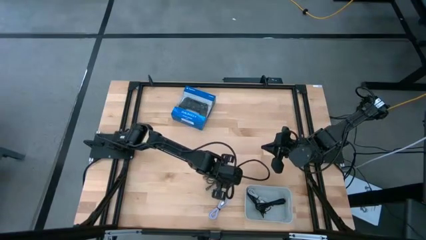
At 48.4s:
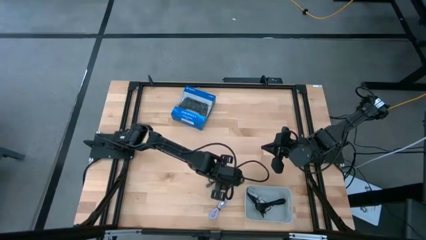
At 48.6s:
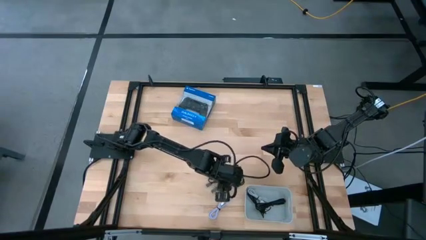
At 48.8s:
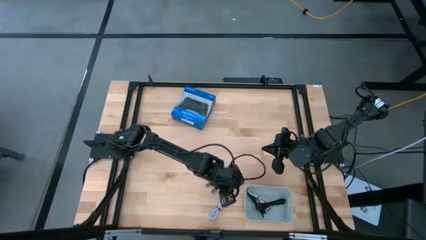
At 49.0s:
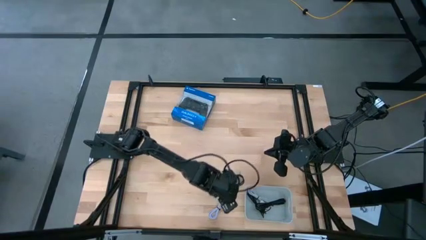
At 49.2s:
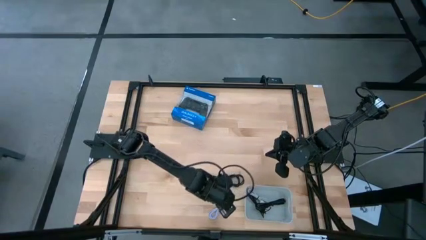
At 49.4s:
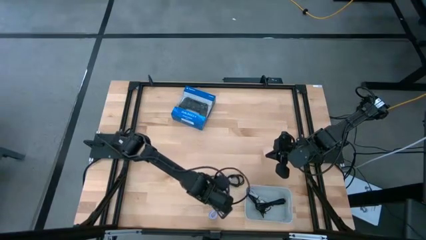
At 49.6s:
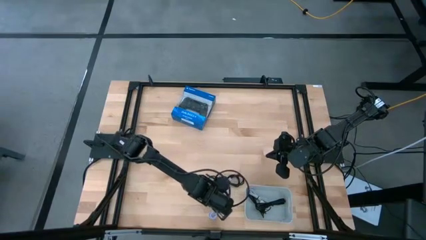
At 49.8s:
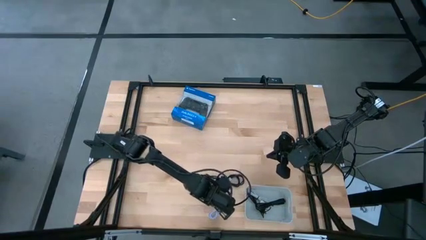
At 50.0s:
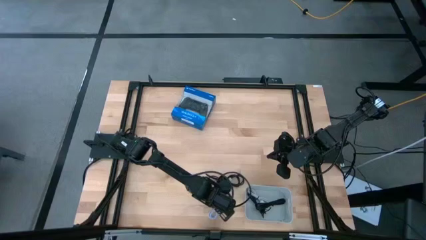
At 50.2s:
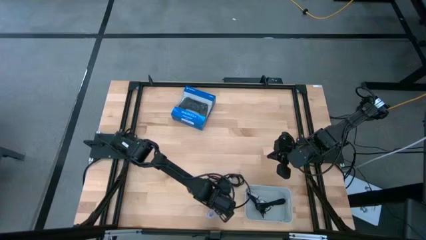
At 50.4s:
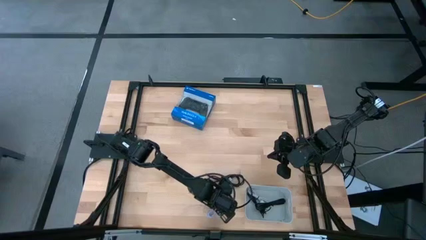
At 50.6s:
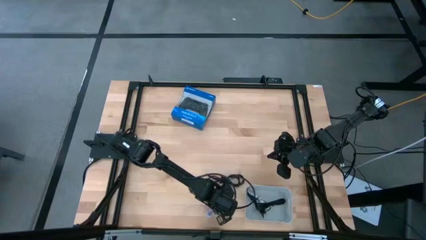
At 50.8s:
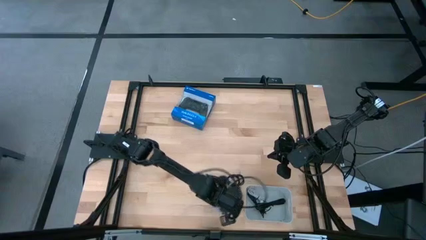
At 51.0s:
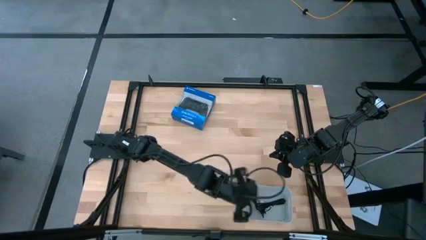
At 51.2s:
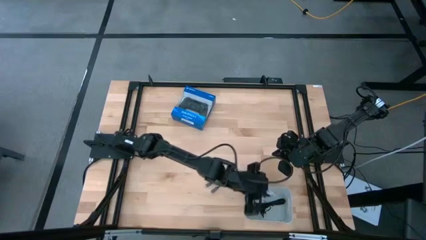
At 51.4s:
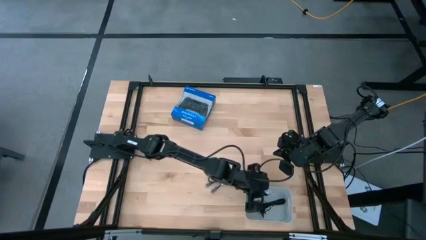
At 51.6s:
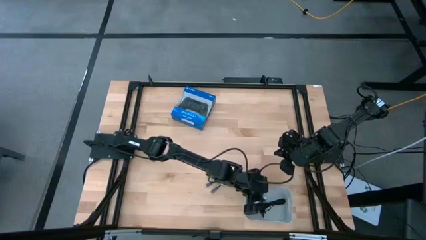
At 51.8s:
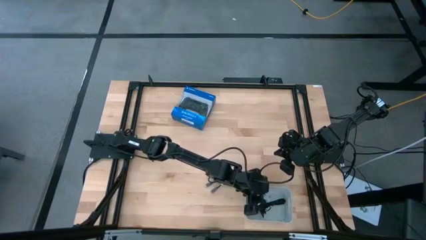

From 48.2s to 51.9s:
Task: Pick and place USB-C Cables
Put the white charger cable into the white bin

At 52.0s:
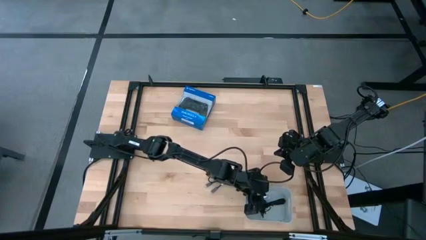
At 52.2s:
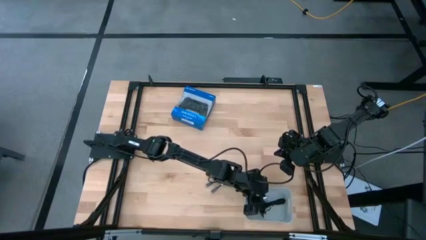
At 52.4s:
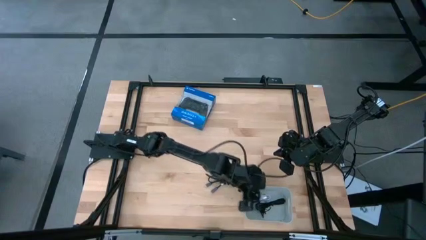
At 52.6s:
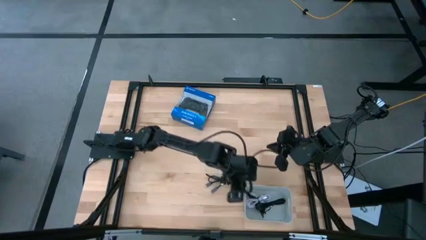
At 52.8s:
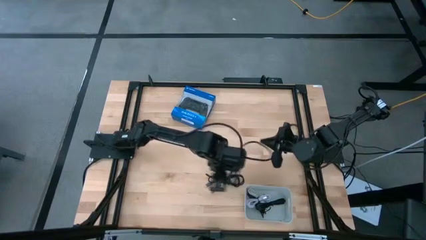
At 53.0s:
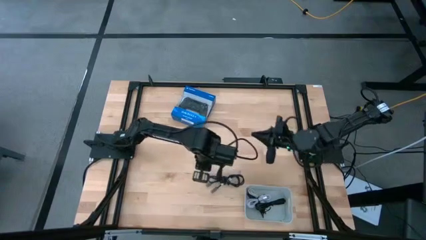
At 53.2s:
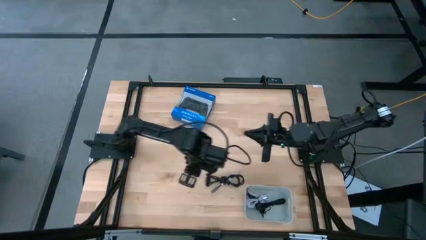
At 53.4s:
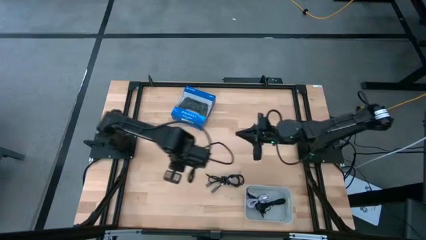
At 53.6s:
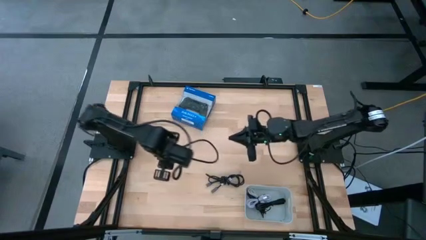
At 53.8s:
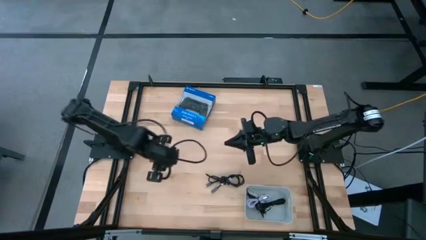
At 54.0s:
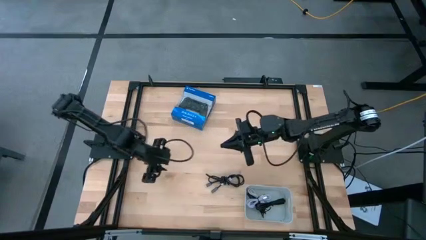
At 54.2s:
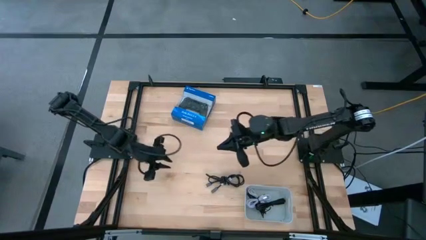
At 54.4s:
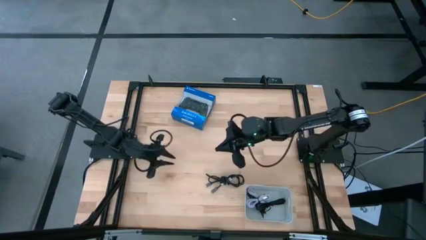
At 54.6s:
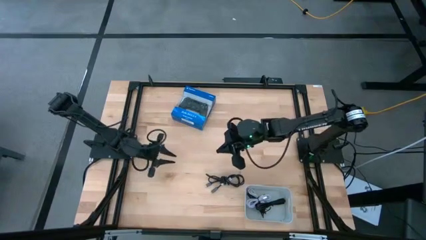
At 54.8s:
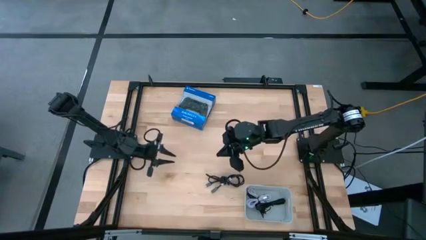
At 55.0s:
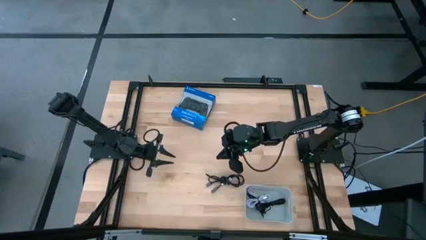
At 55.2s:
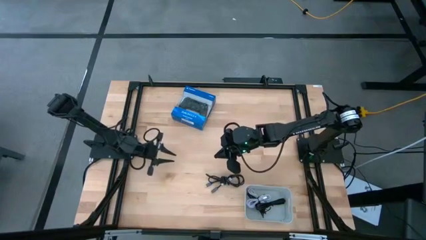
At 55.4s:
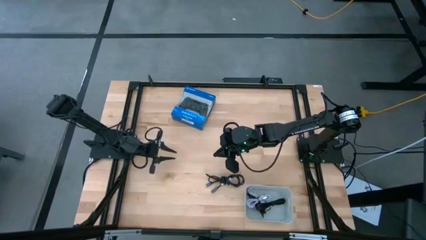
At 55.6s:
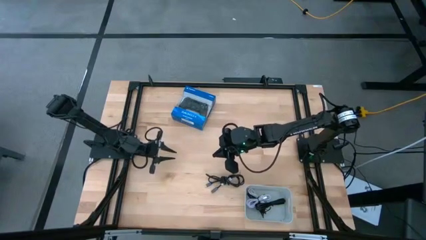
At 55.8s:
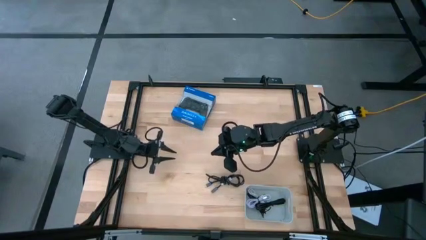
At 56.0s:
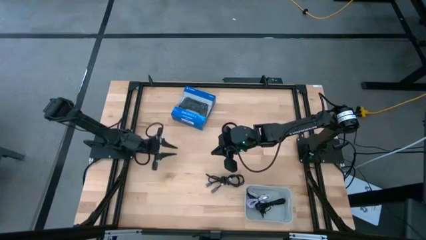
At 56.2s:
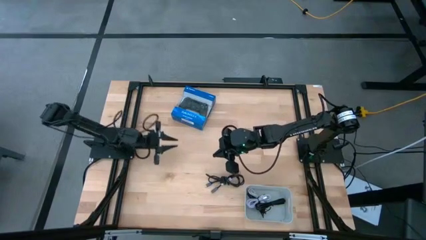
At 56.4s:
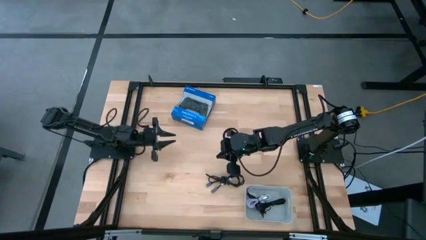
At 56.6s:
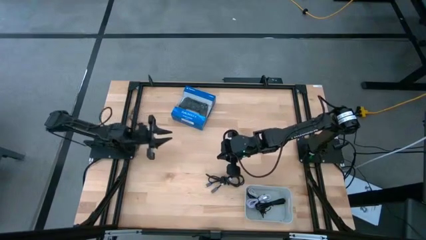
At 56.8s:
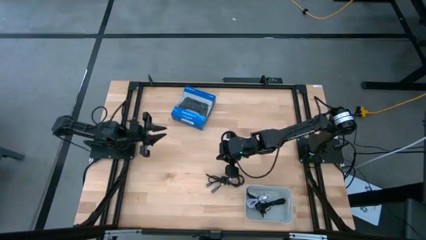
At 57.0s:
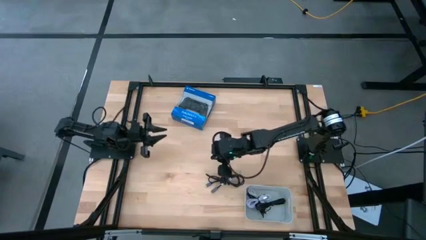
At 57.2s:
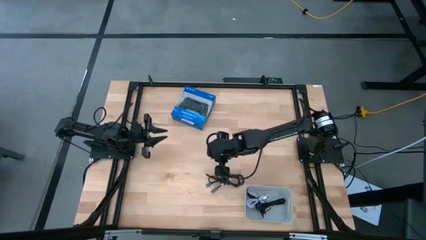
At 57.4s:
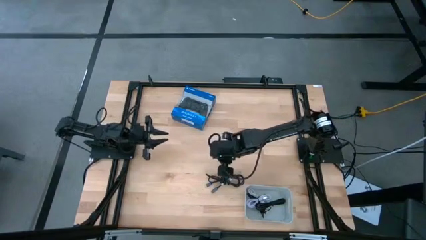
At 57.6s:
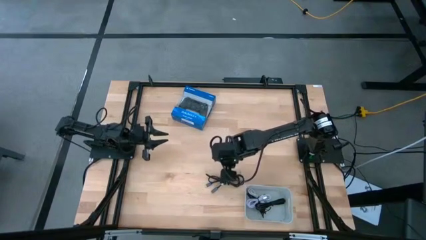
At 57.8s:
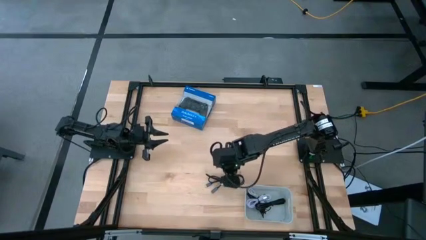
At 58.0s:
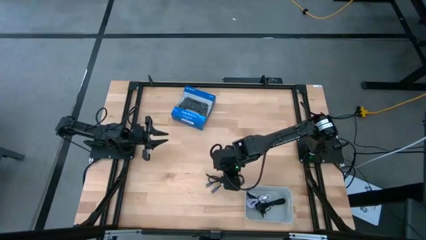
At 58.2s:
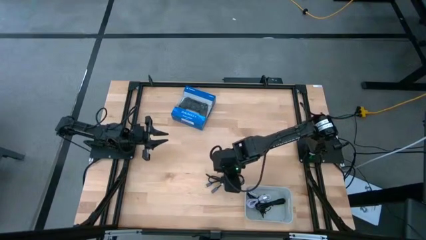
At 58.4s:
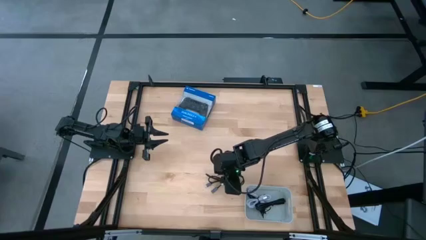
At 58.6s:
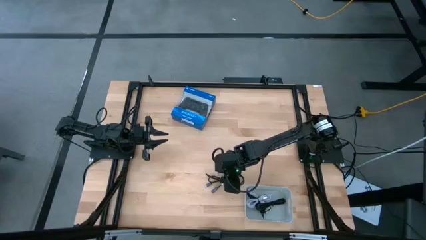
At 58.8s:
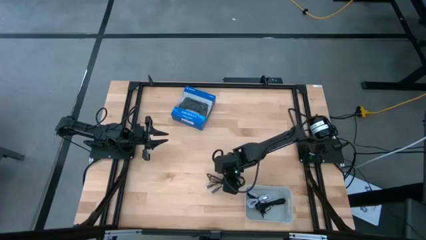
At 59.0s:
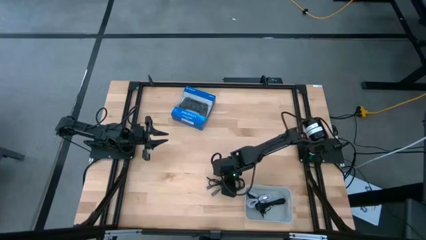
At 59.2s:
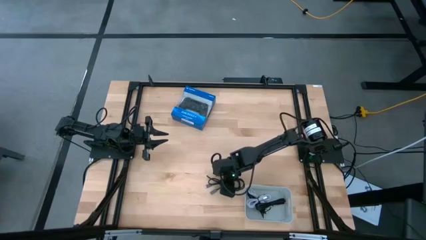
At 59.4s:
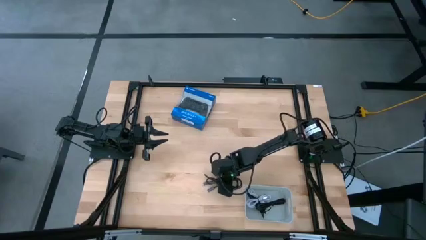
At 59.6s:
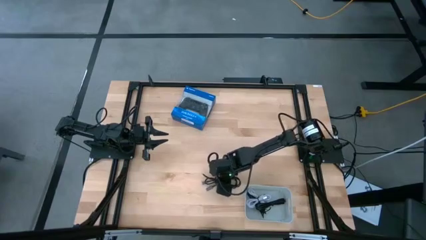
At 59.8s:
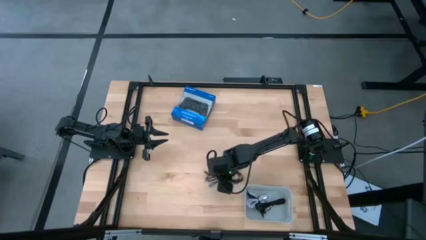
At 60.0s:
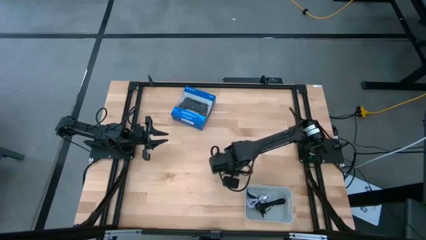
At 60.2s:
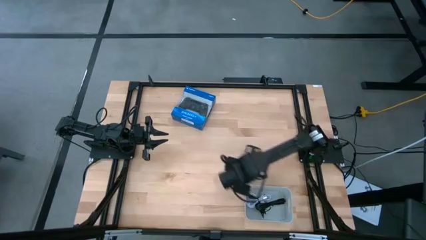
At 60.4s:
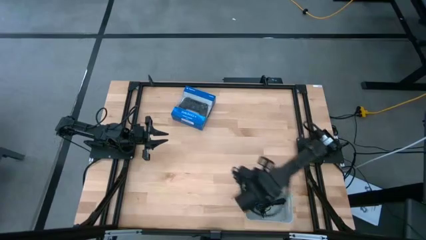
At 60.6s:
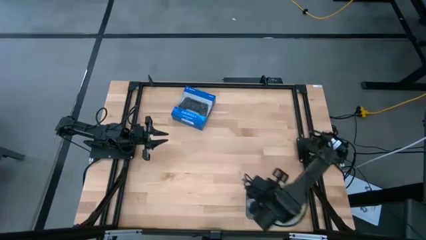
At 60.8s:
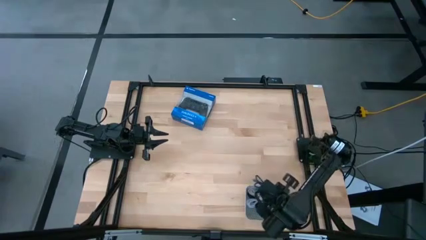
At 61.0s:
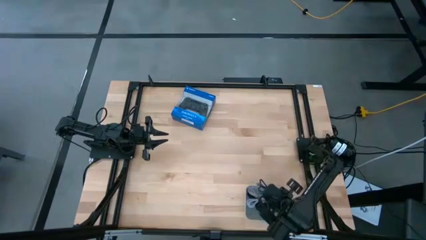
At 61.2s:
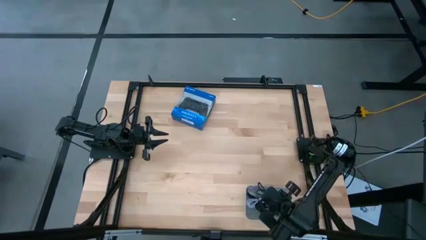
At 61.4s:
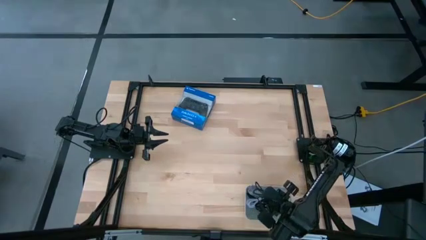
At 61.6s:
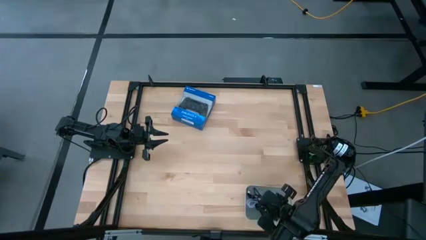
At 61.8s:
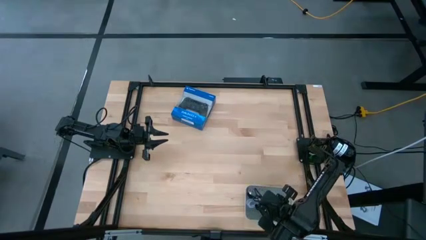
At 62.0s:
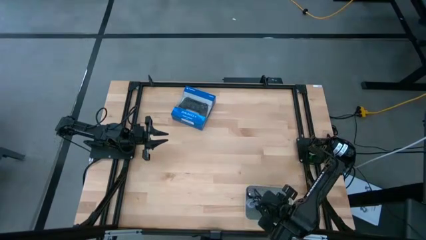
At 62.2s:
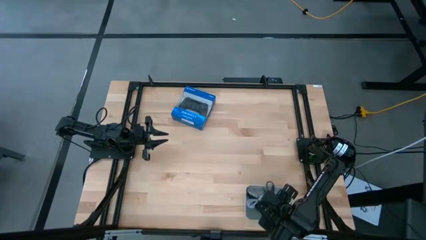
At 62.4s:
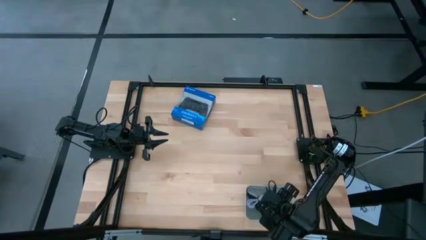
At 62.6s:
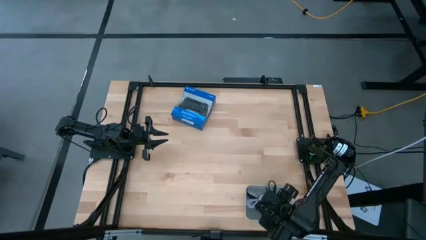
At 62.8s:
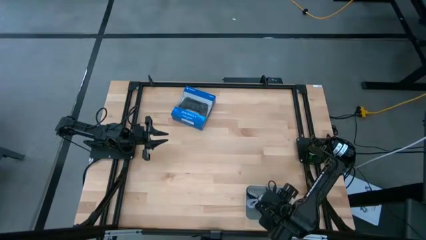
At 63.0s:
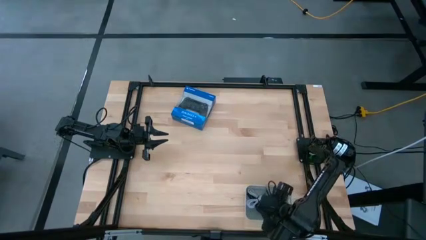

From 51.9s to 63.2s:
Put the black charger cable into the white bin

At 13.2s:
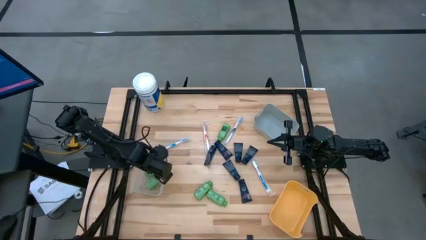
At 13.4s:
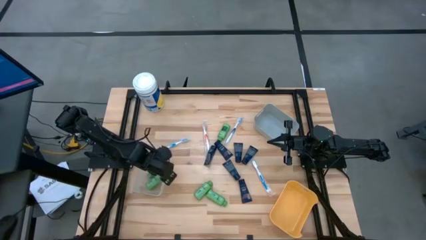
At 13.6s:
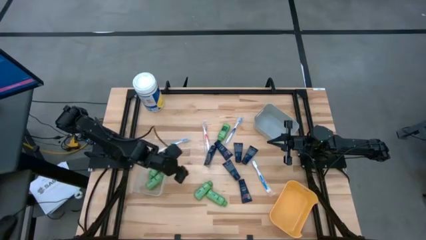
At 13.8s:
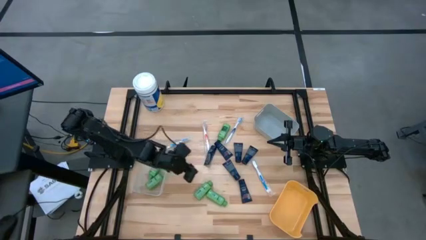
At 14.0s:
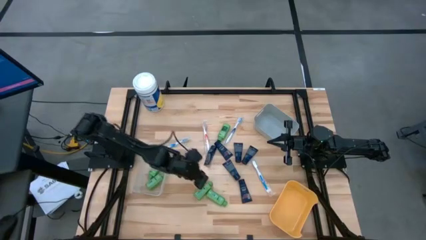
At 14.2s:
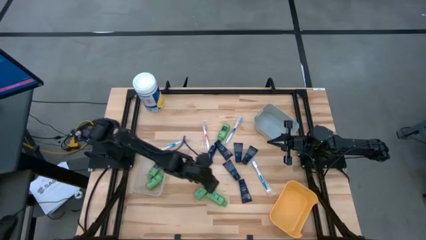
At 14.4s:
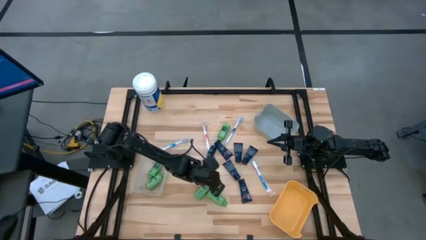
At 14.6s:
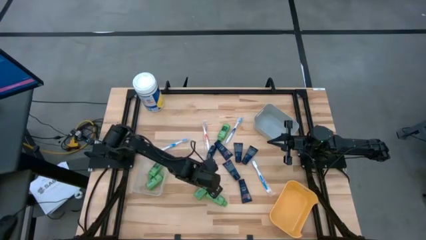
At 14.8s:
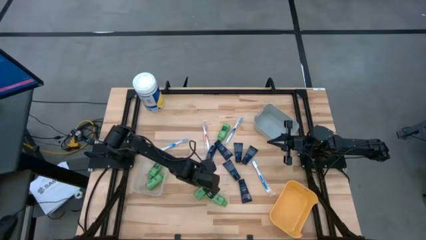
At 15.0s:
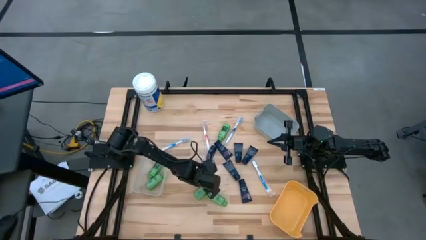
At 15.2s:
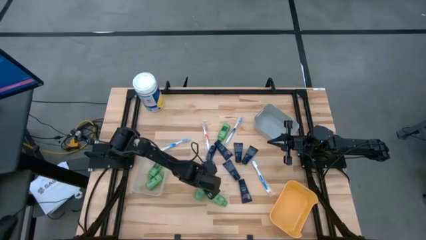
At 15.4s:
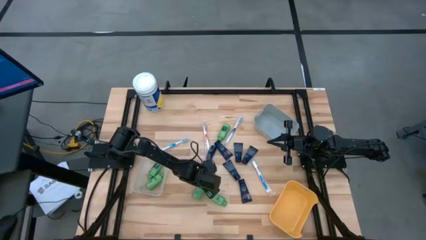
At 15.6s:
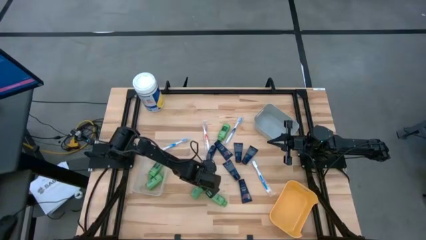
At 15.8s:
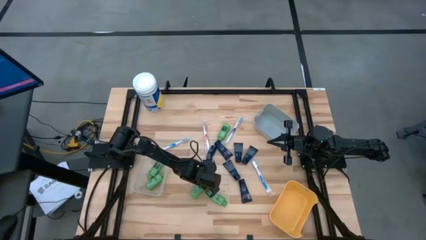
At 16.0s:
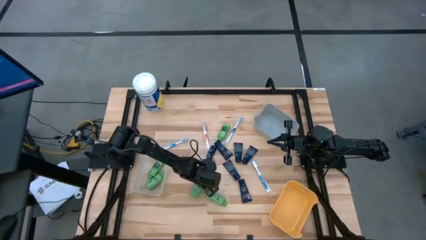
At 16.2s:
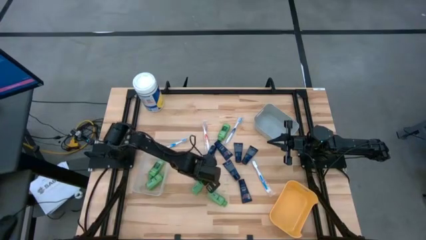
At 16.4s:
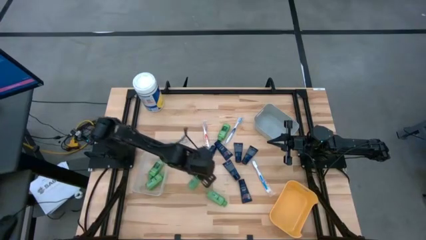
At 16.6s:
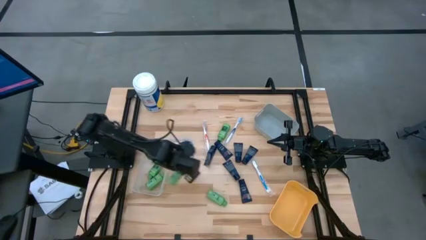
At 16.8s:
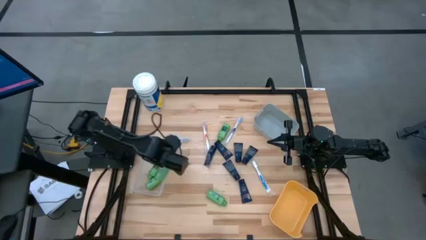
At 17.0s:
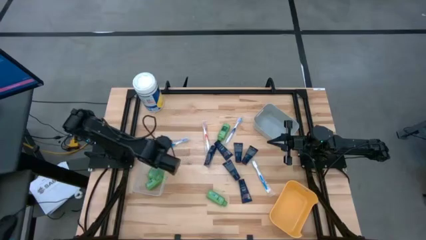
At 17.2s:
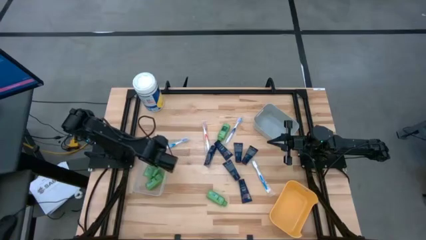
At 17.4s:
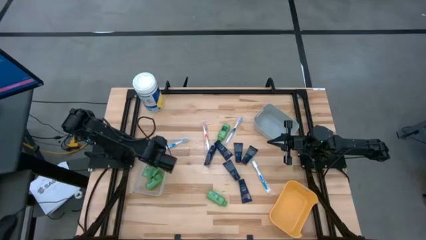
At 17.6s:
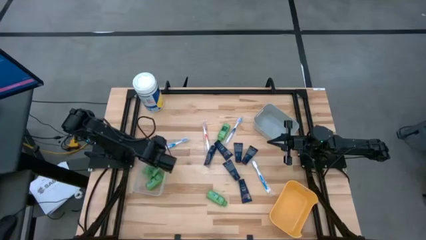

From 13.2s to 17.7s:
Task: Pick & Place Travel size toiletries
Put the green shampoo bottle into the transparent bin
